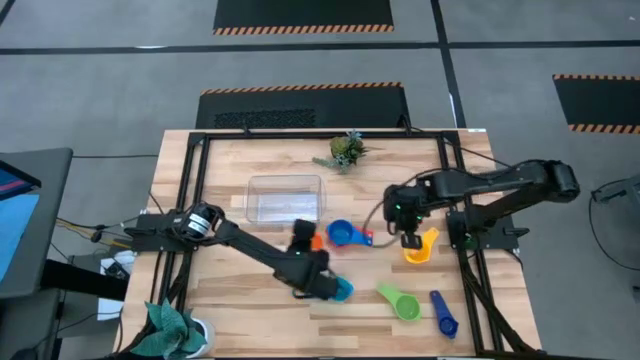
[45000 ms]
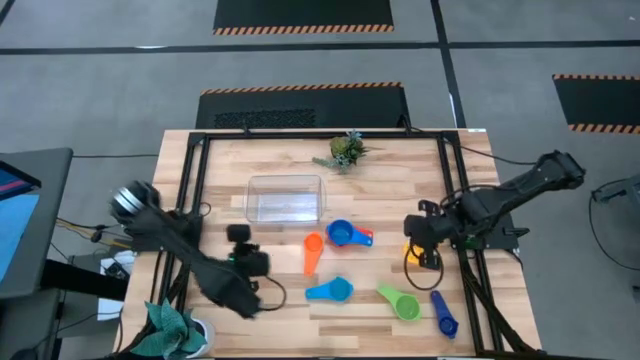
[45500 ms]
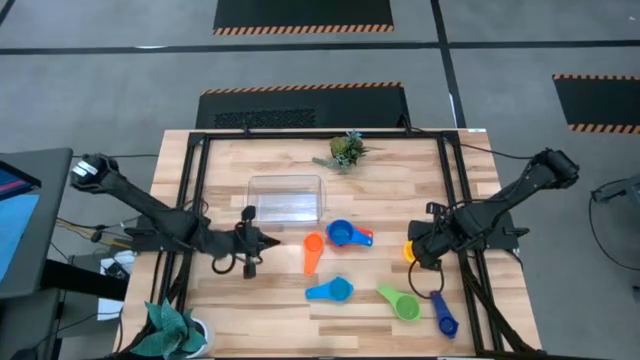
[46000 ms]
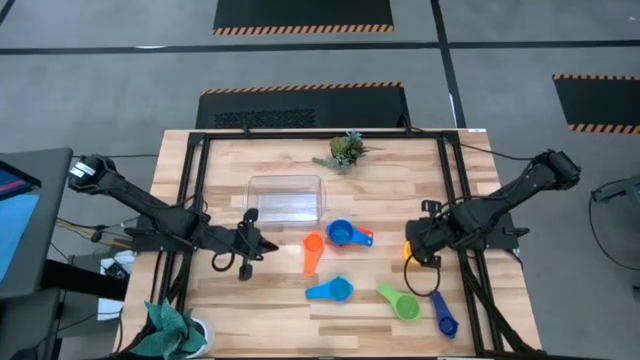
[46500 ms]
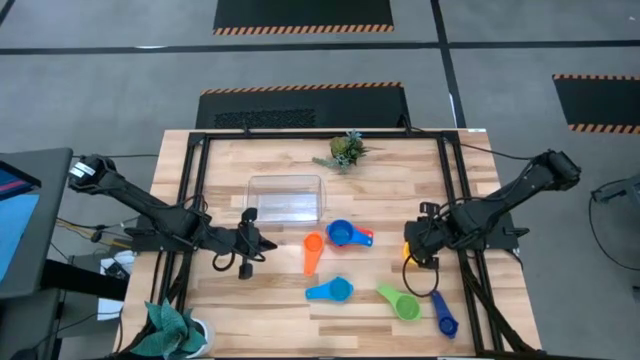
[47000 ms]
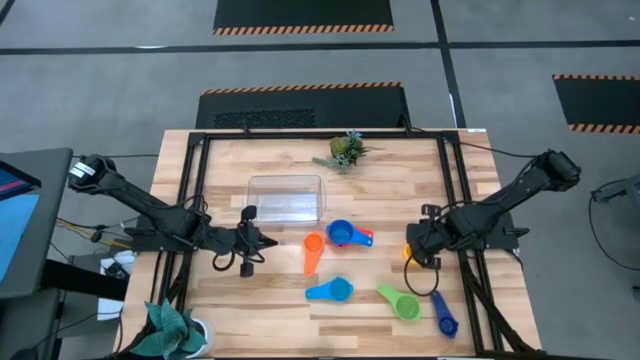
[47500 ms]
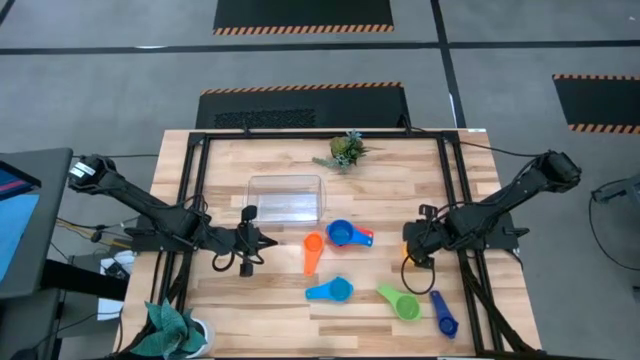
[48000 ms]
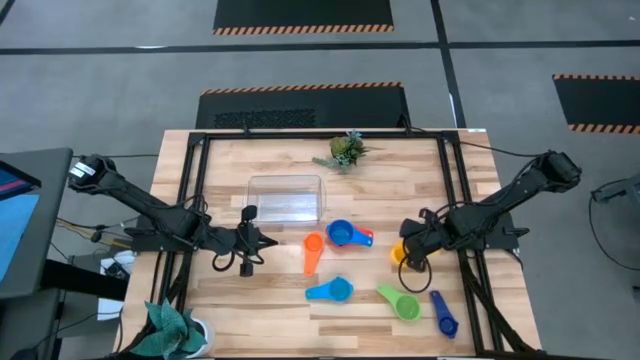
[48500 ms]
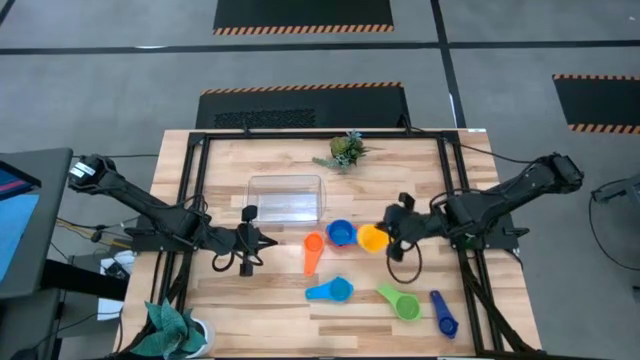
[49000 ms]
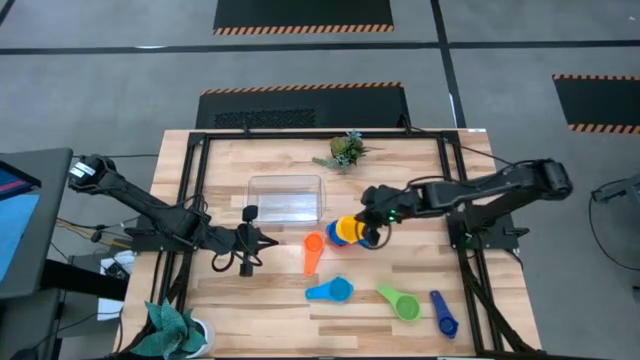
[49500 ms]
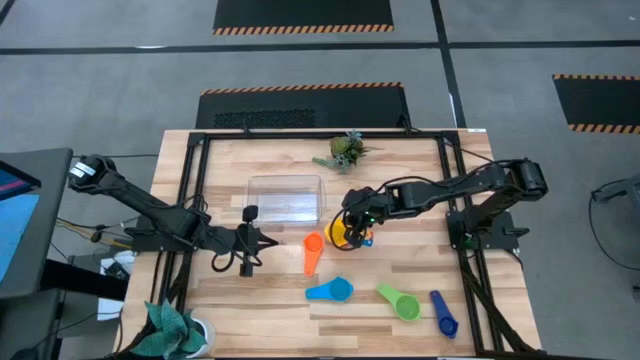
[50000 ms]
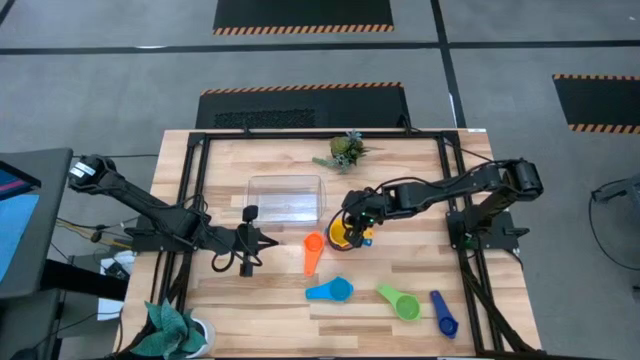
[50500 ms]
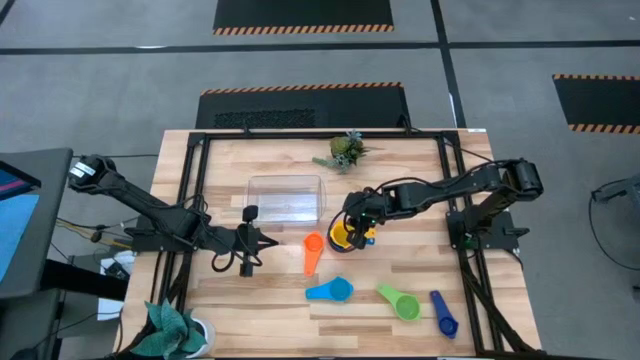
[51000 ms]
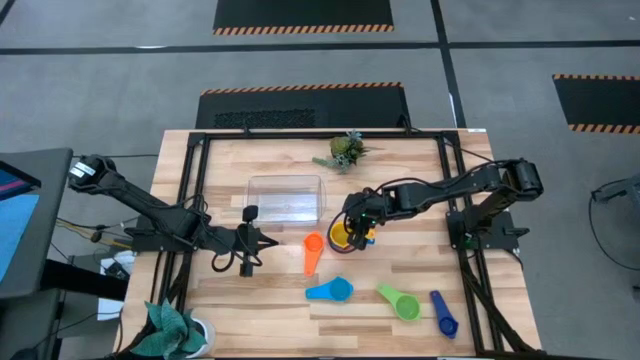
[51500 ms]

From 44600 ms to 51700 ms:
Task: Nest measuring cups in basket
Stack the yellow measuring cup on top of the blue measuring cup

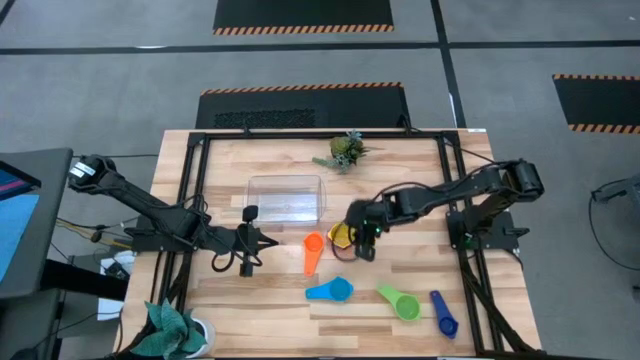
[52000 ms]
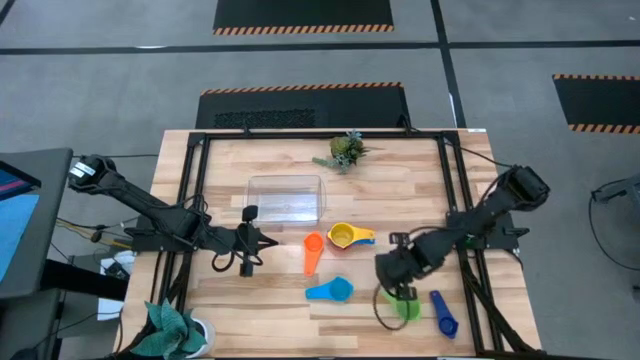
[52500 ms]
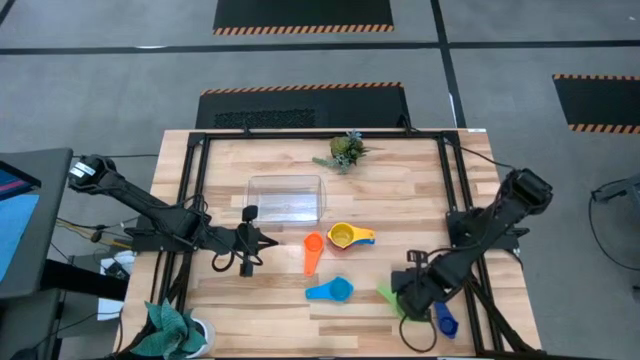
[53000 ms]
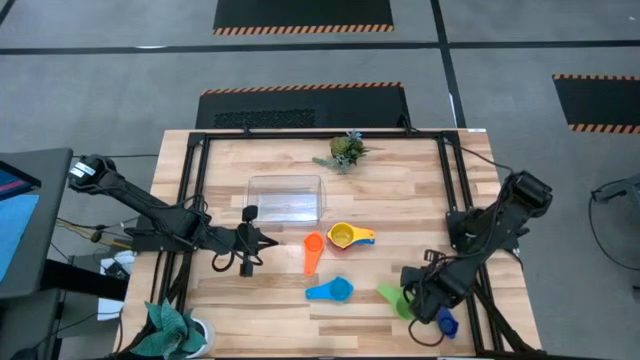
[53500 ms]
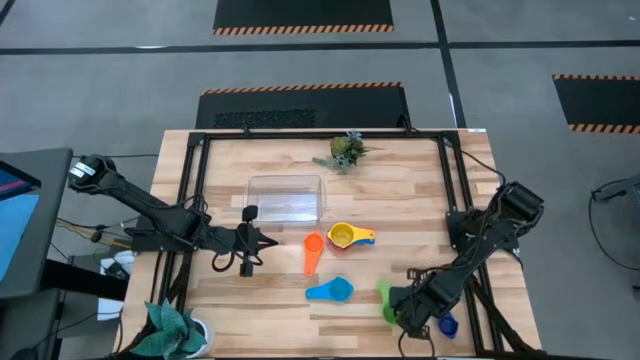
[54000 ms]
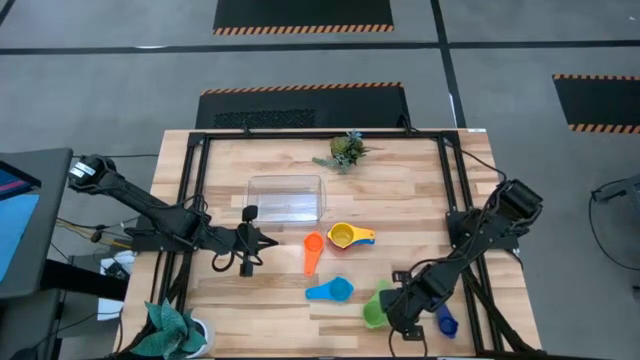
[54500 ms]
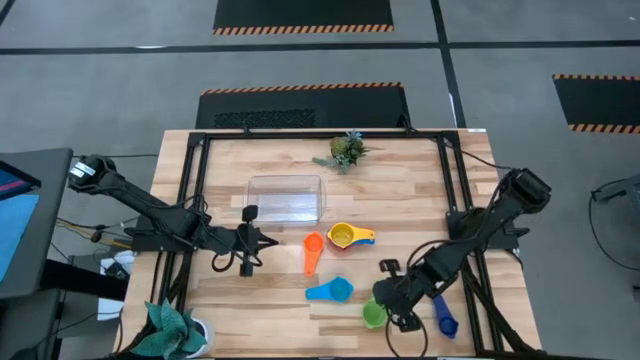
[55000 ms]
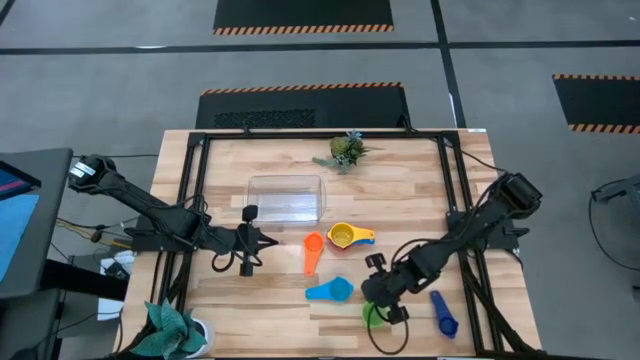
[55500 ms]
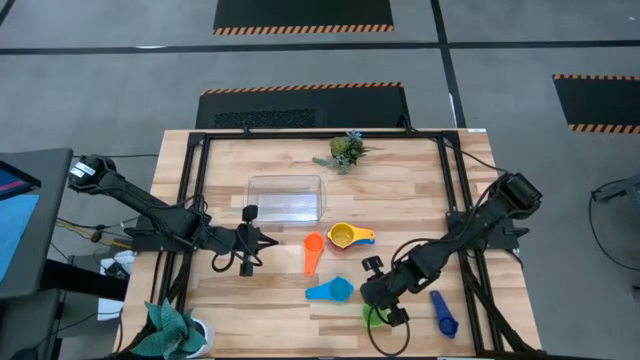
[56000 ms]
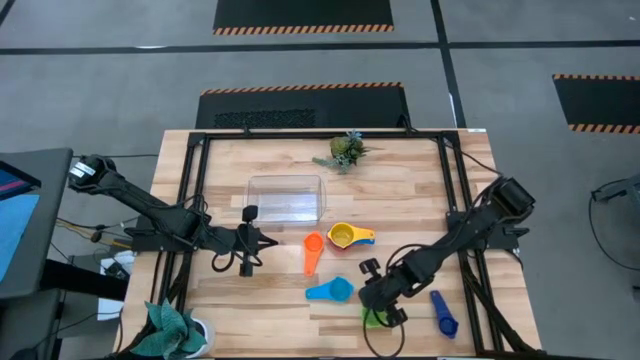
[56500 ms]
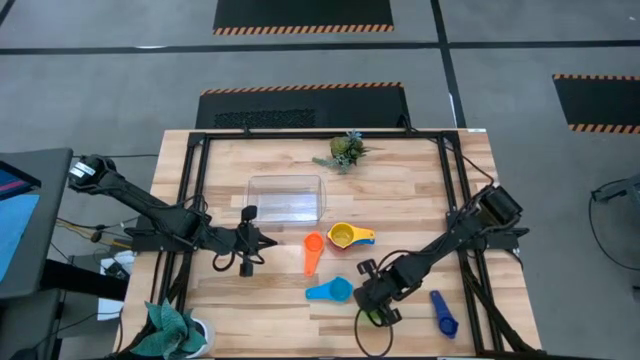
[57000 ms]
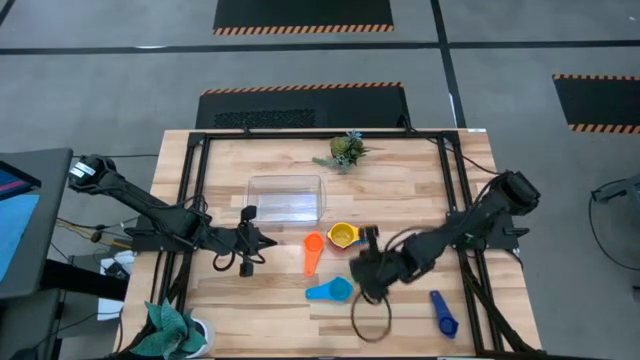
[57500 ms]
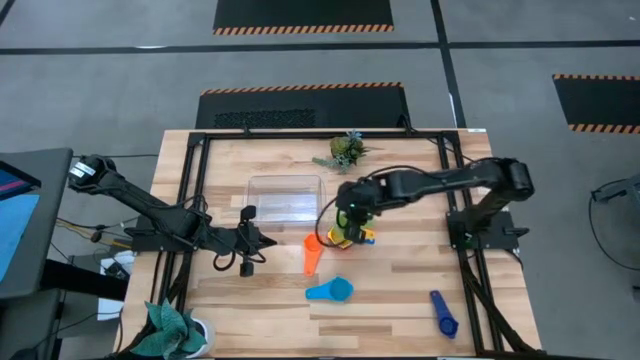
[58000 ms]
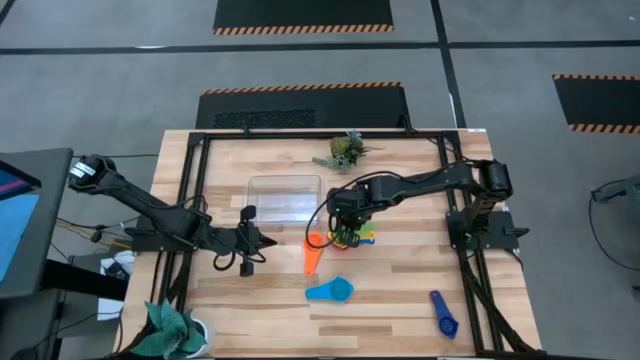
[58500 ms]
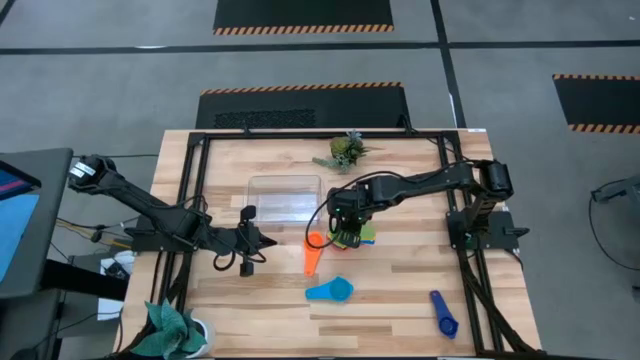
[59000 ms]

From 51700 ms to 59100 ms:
Stack the green measuring cup on top of the yellow measuring cup

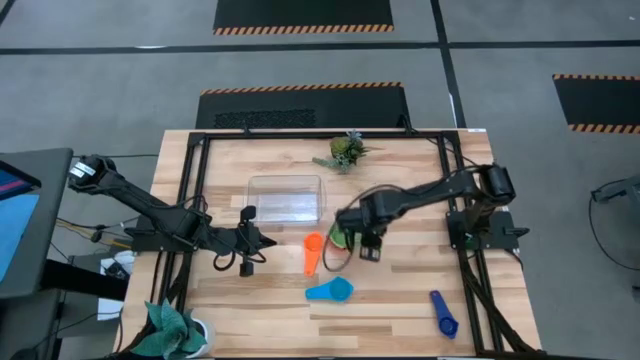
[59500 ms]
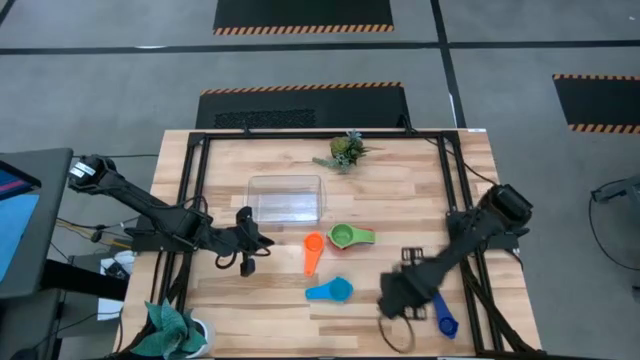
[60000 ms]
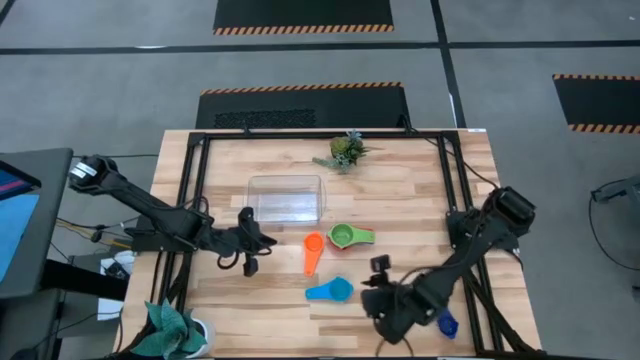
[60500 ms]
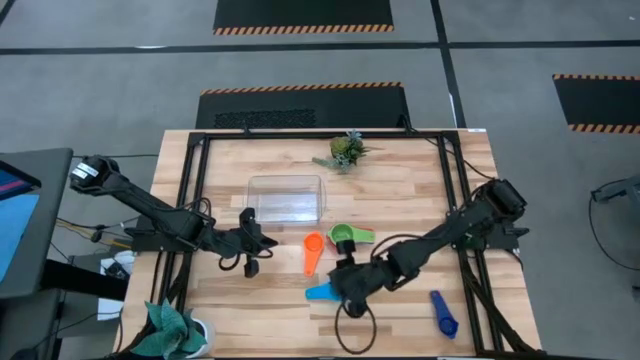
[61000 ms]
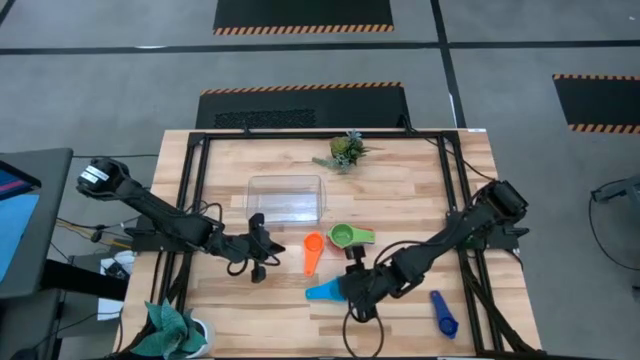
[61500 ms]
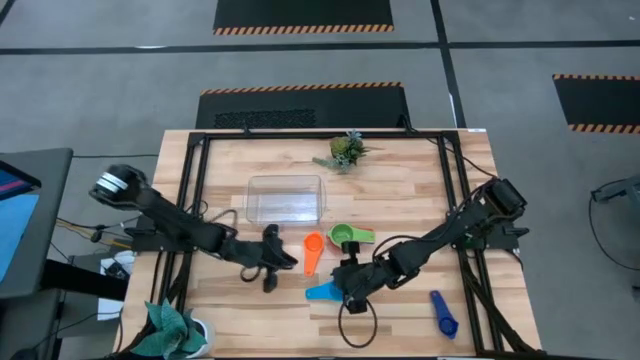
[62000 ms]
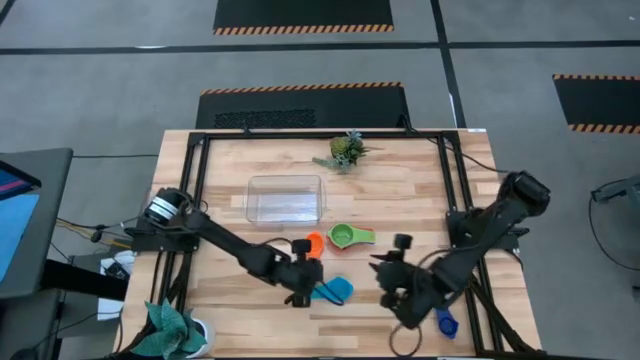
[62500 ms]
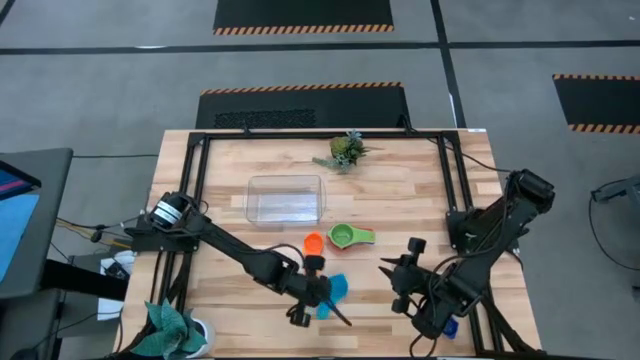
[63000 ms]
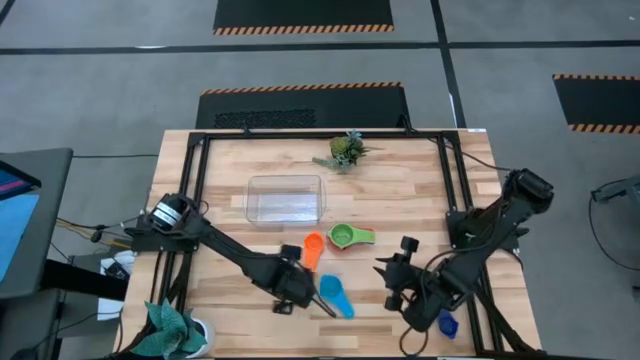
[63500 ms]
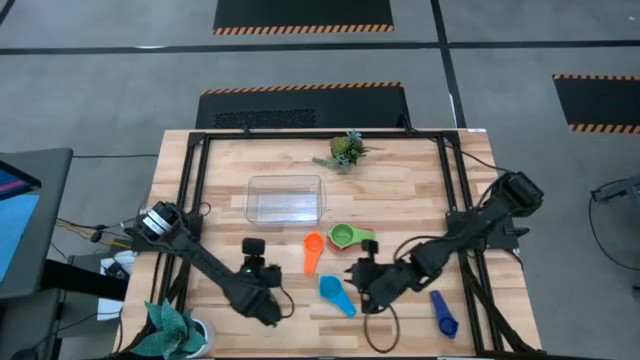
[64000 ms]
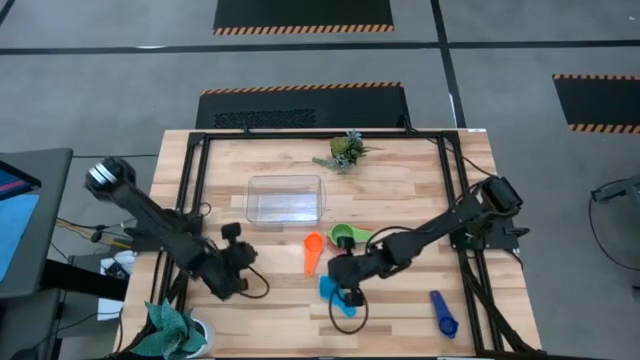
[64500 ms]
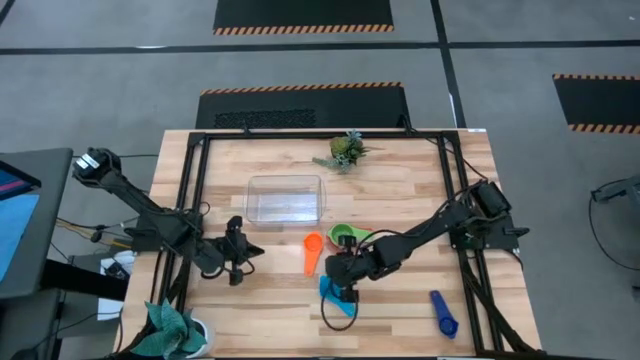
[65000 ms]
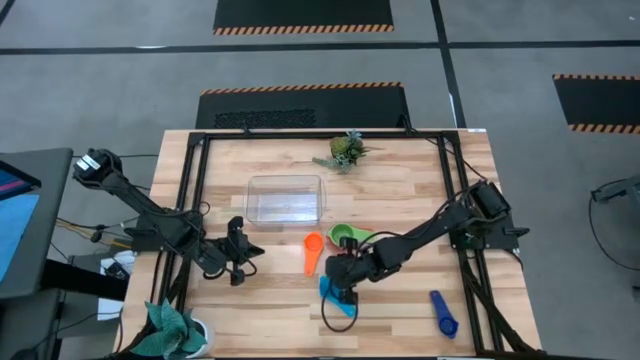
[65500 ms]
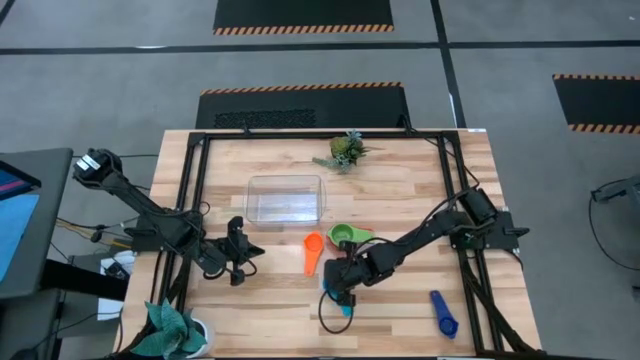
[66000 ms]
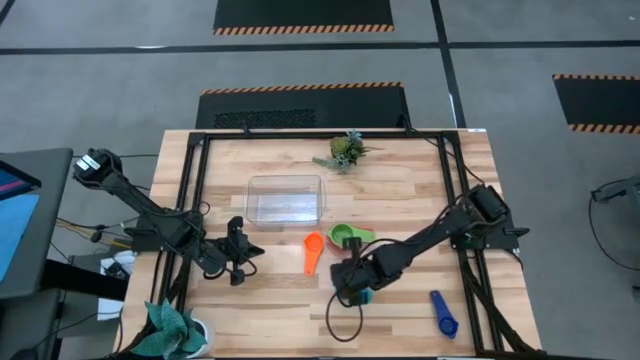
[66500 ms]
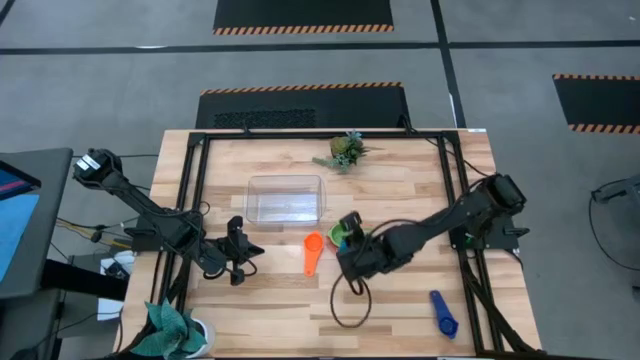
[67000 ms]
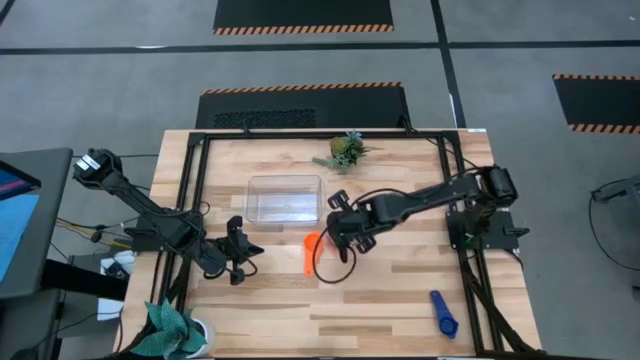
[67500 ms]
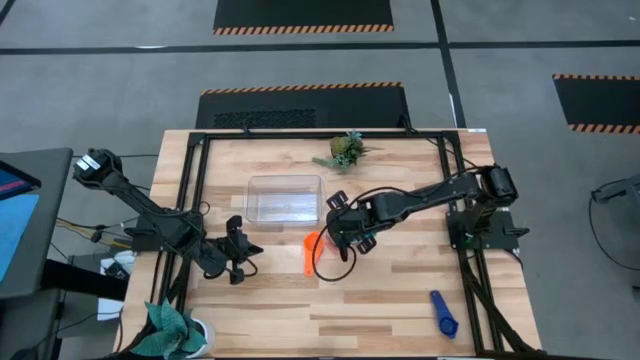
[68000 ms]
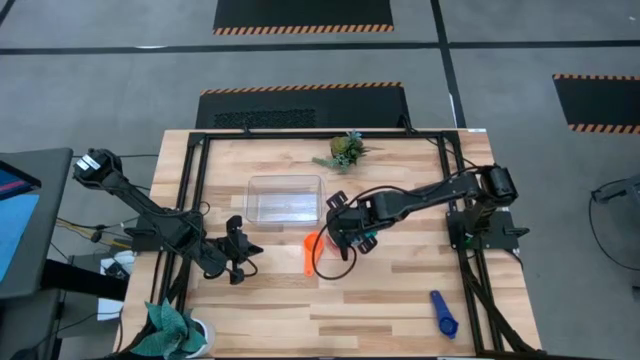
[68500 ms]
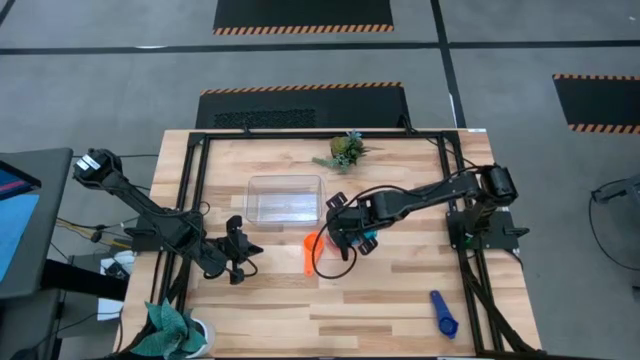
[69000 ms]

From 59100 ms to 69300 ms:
Stack the light blue measuring cup on top of the green measuring cup
